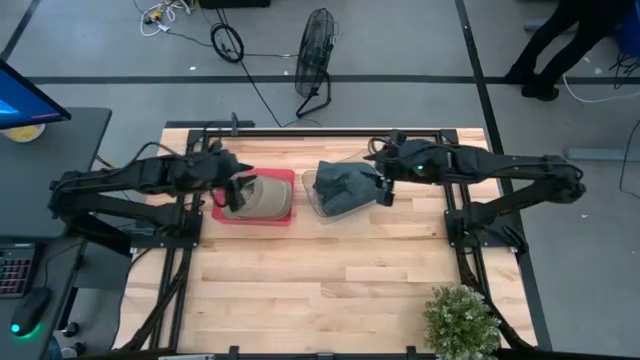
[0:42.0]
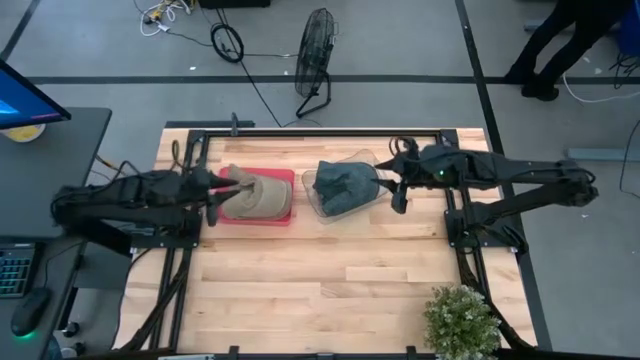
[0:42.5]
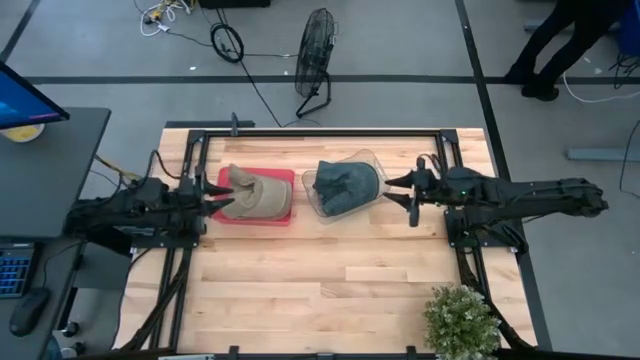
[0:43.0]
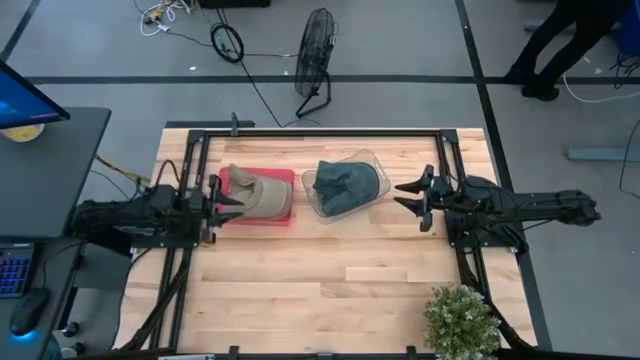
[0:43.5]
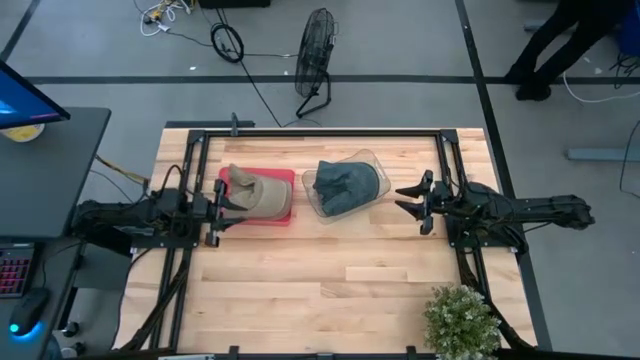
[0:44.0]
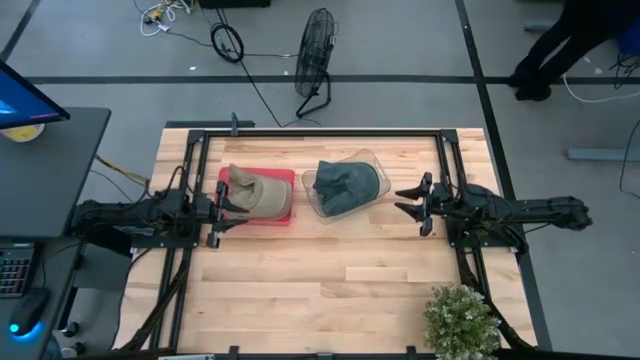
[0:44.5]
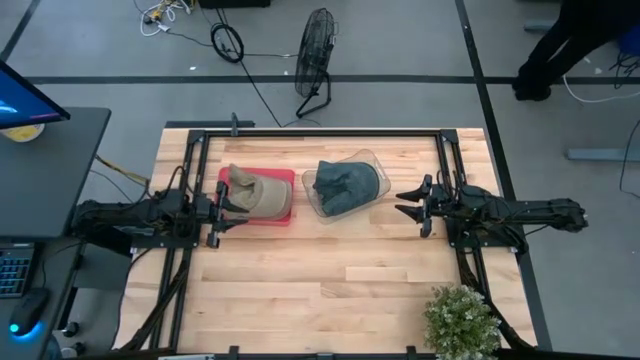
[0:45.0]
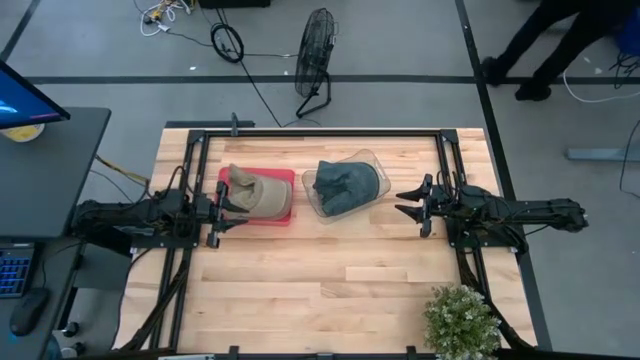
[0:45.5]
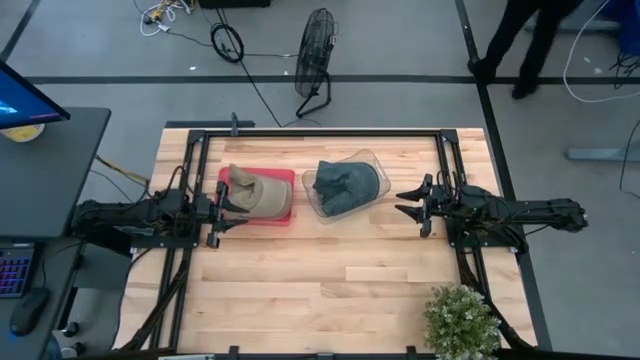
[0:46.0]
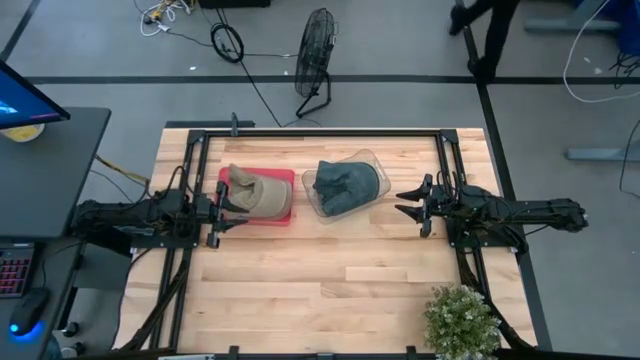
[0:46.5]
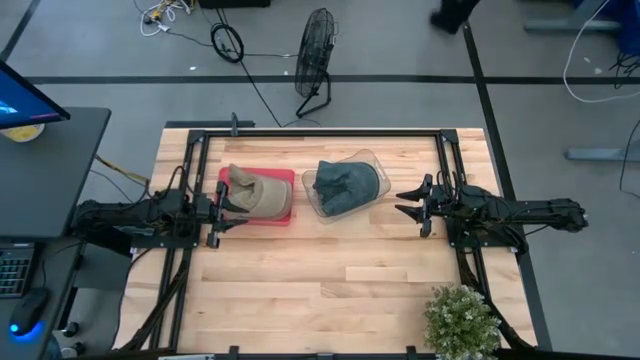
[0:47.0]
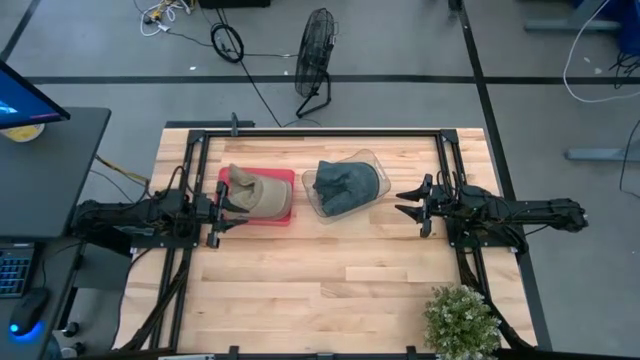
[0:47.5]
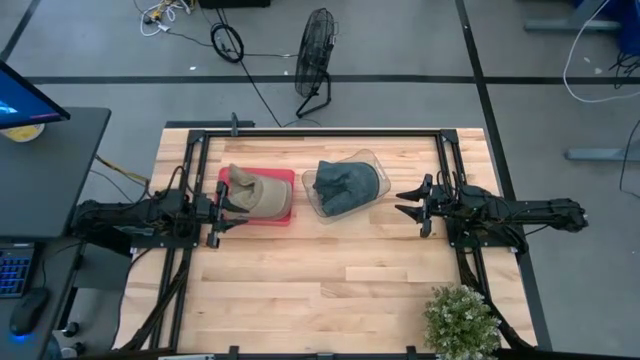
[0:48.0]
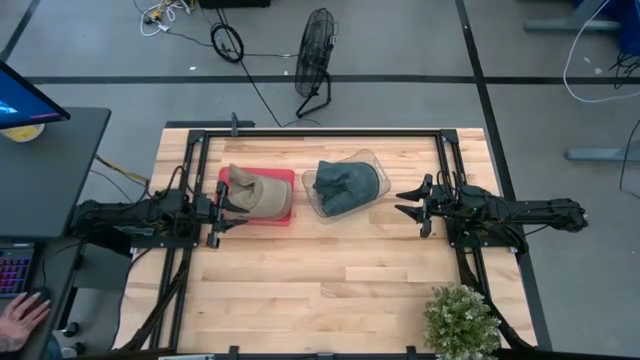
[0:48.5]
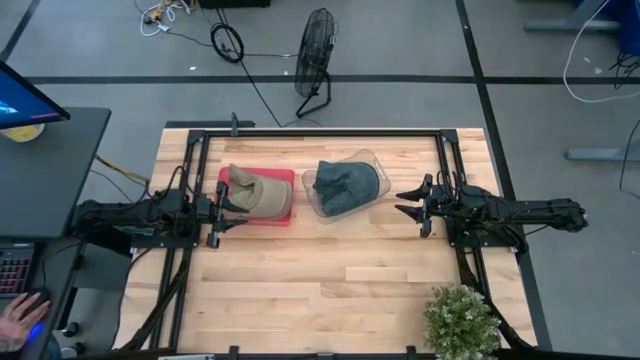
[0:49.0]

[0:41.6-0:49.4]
Task: Pick & Place hat
Return to Home Position

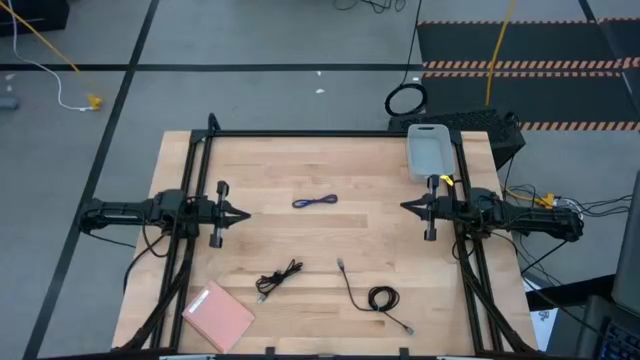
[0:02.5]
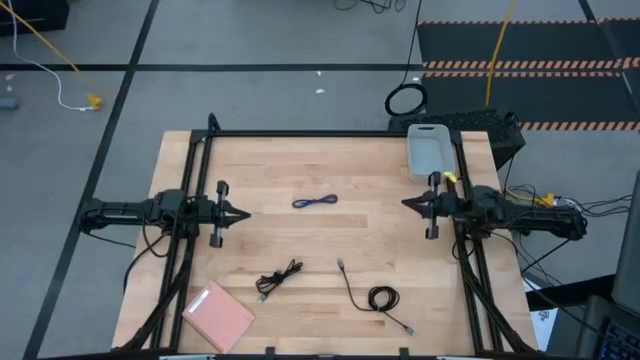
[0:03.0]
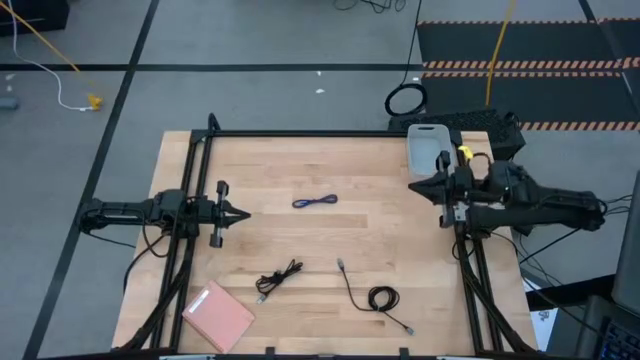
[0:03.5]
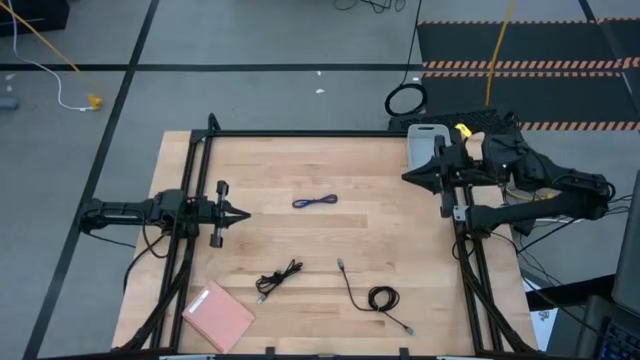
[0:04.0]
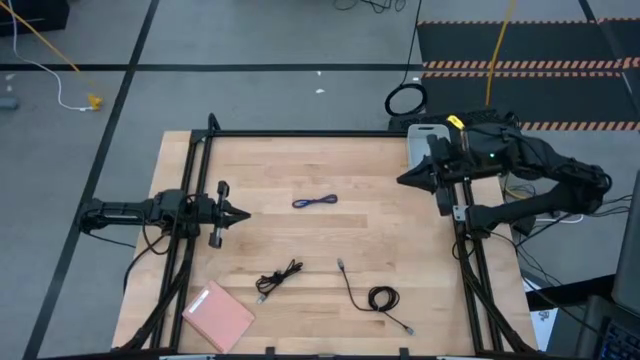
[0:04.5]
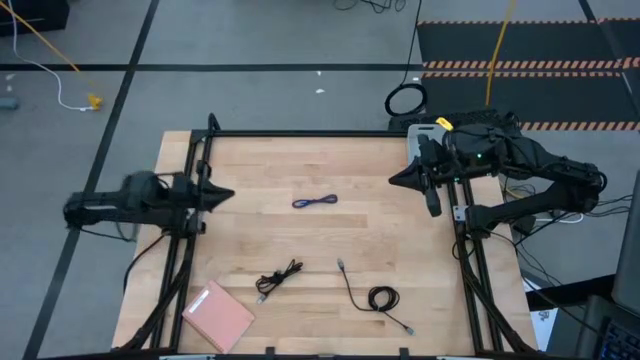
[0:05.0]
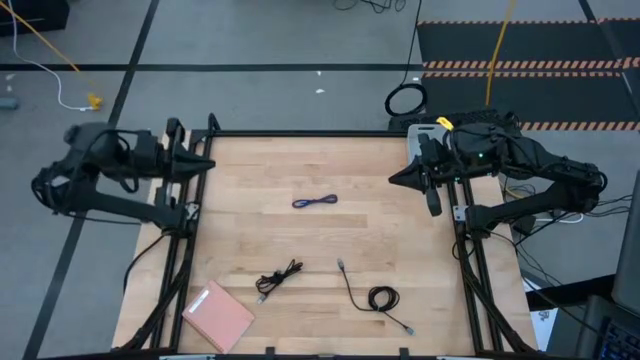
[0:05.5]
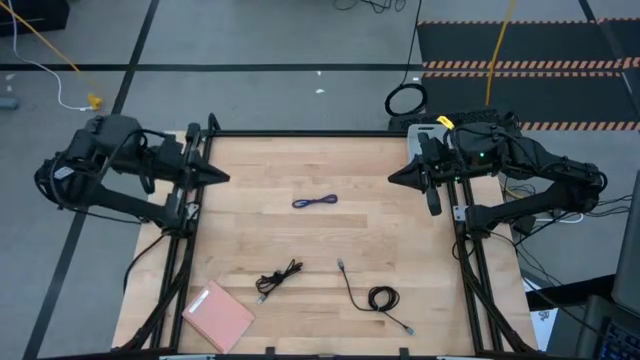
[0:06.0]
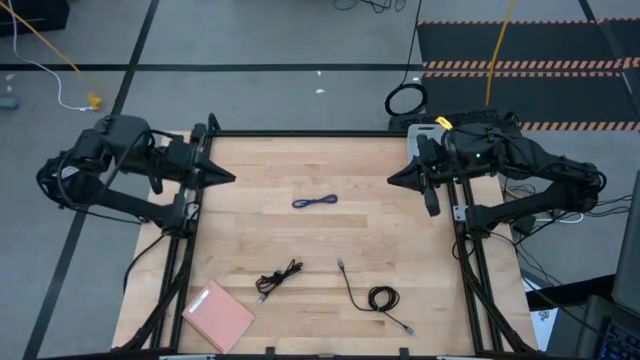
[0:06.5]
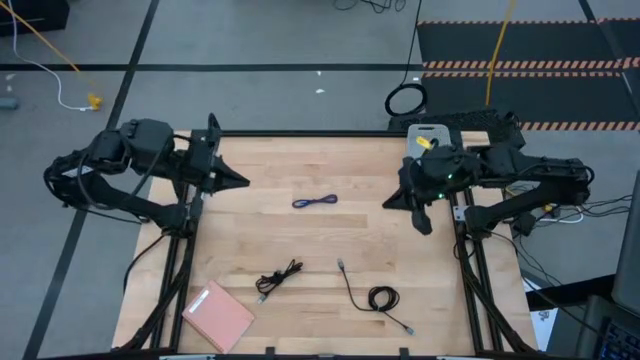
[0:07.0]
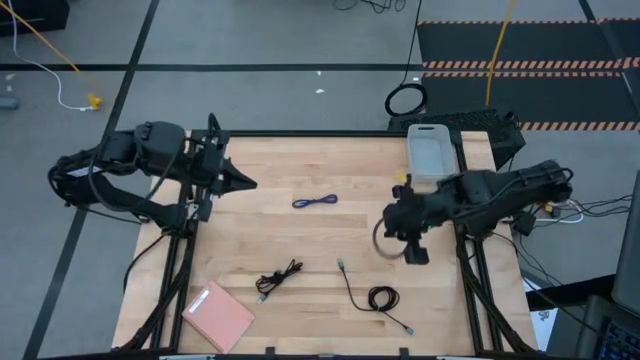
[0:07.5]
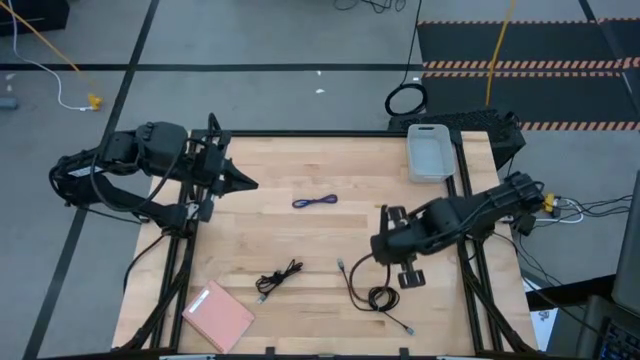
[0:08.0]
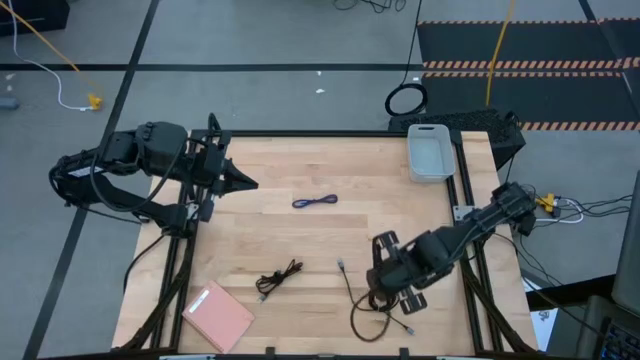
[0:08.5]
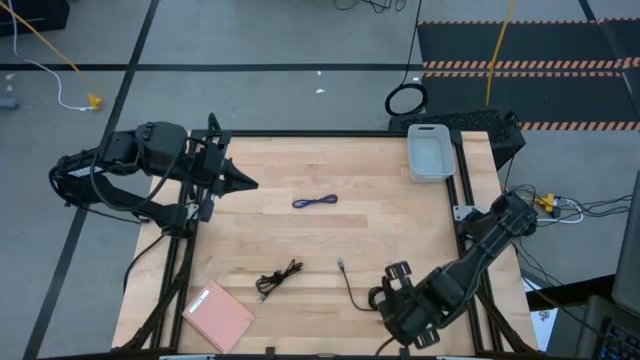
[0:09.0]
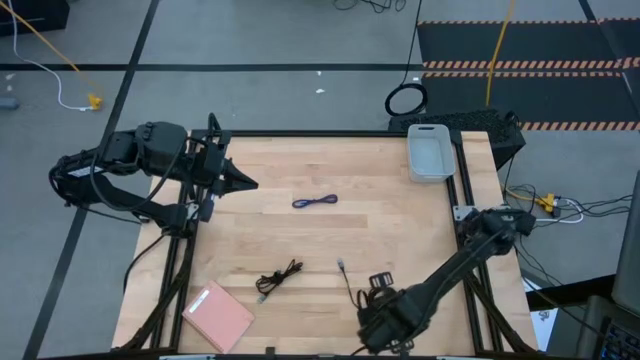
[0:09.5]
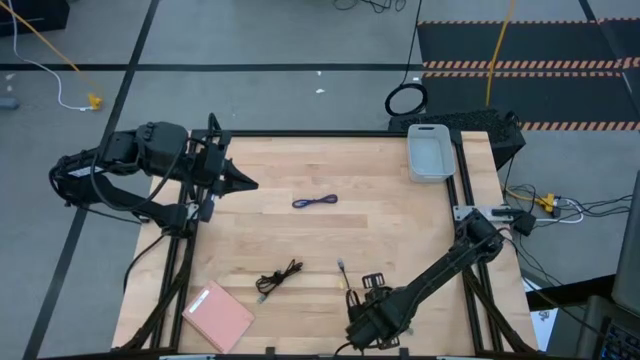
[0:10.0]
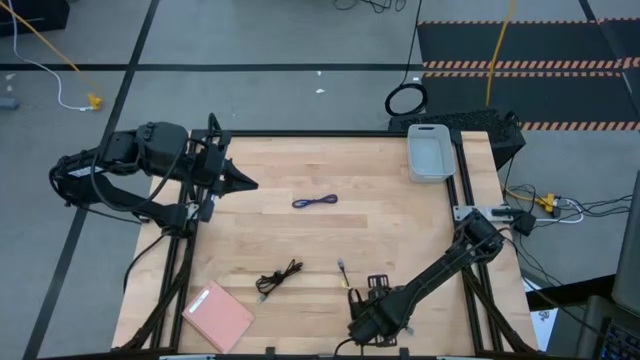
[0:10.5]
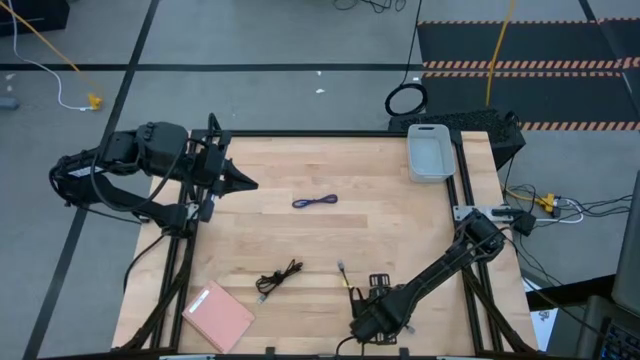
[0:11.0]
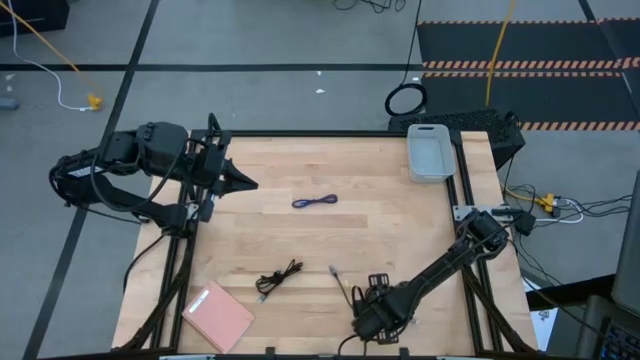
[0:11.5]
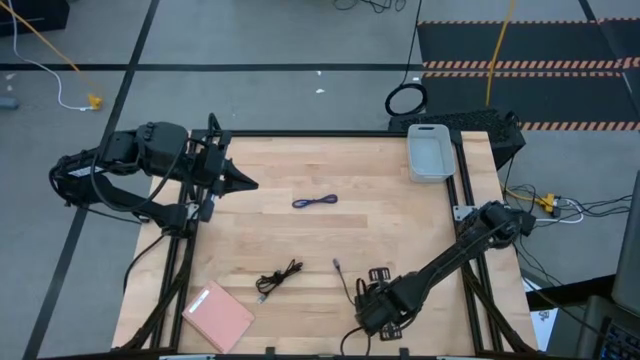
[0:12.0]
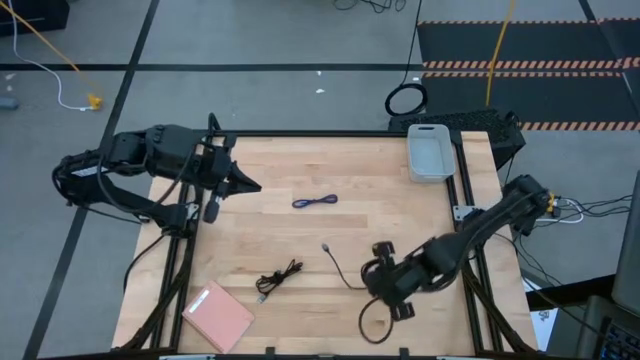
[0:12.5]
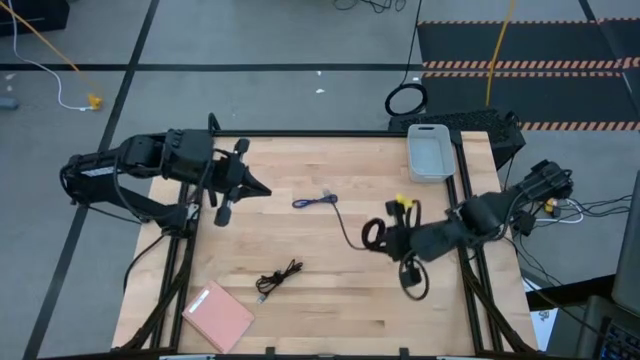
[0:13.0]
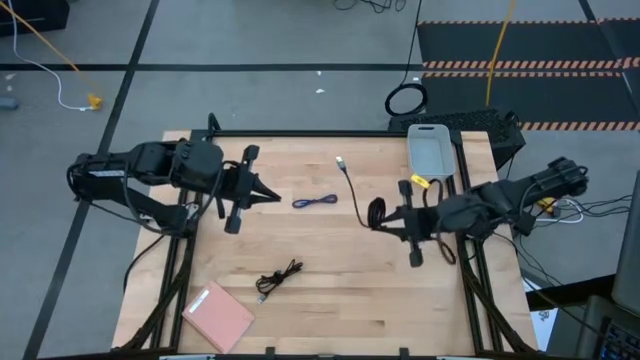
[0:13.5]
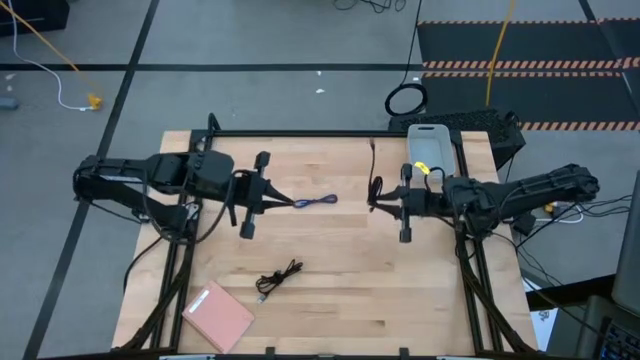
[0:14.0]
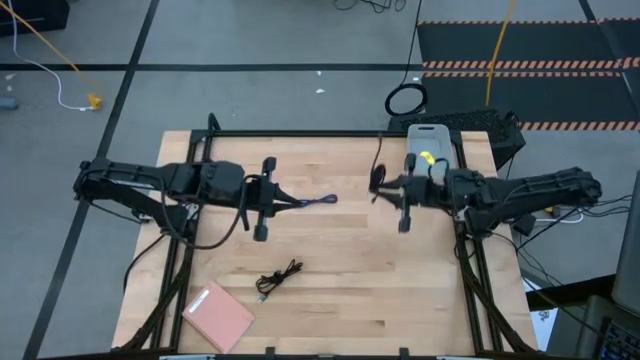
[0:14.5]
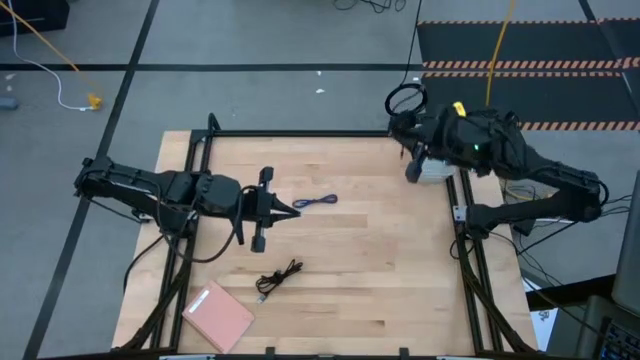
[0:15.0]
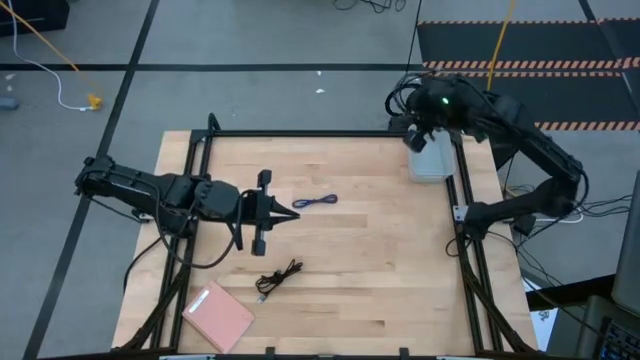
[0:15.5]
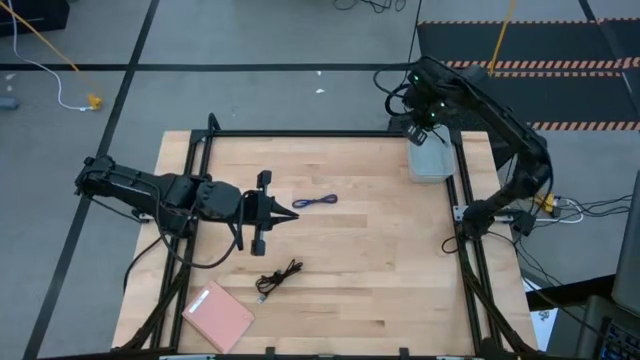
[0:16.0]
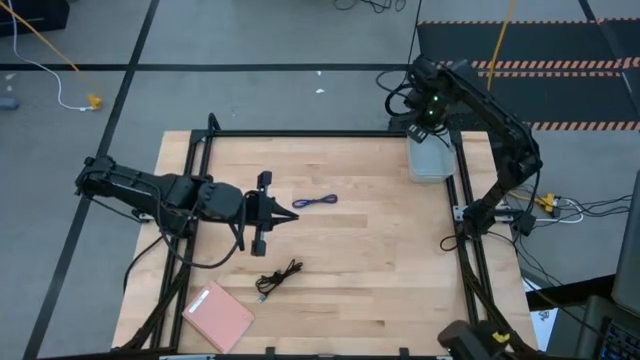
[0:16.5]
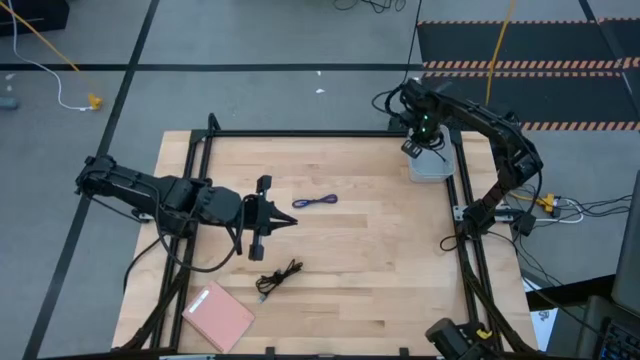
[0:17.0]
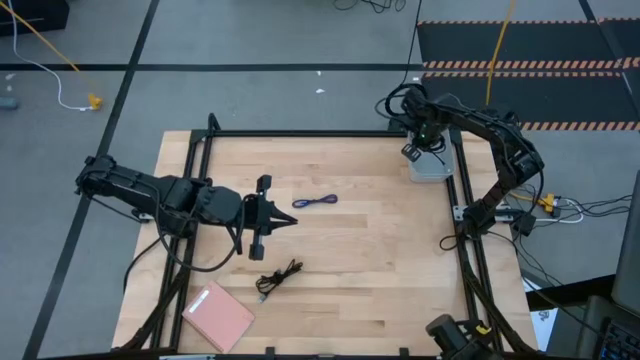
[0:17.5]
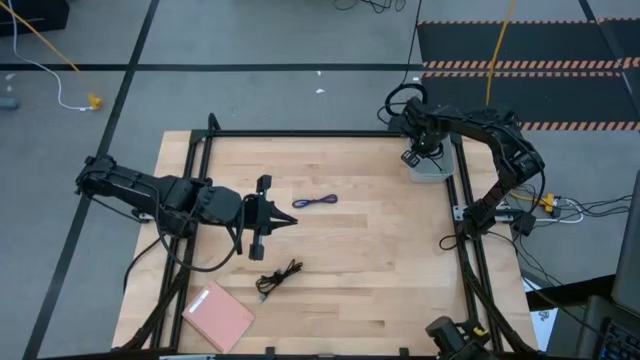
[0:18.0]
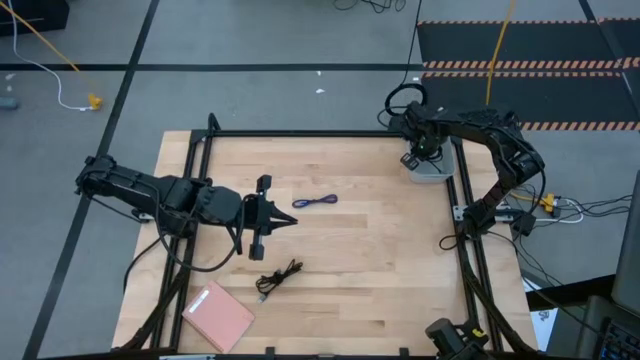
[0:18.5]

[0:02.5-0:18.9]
Task: Pick and place USB-C Cables
Put the right black charger cable into the white bin
